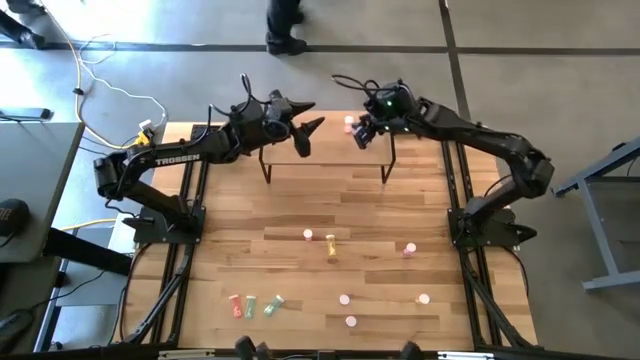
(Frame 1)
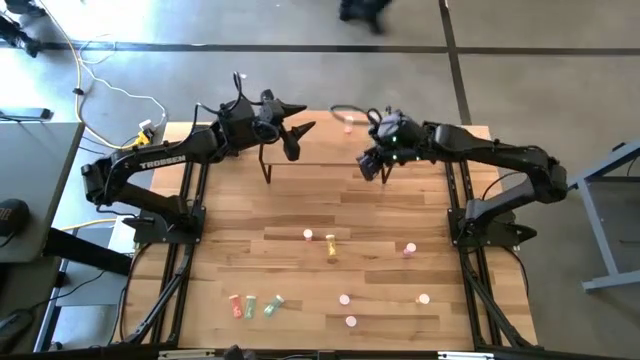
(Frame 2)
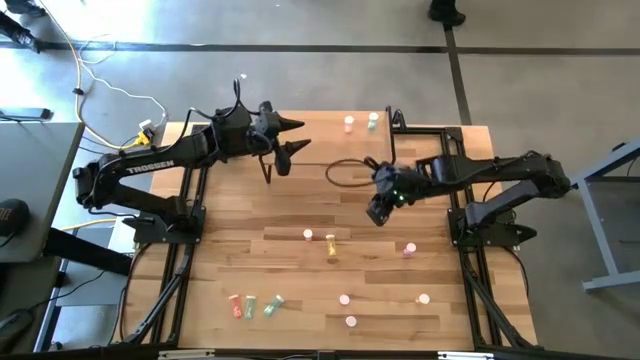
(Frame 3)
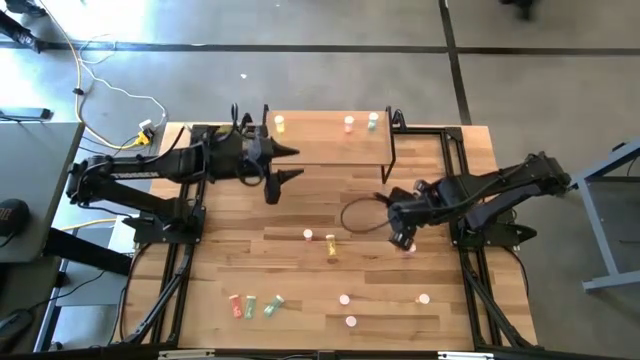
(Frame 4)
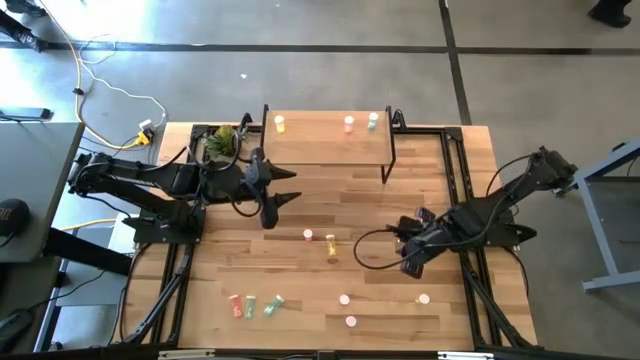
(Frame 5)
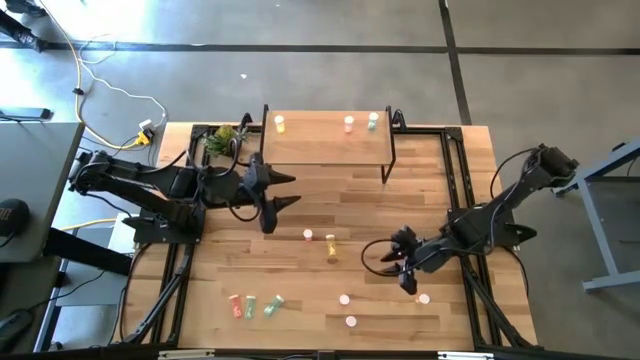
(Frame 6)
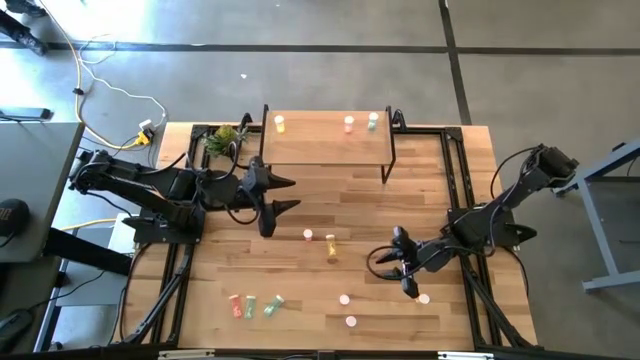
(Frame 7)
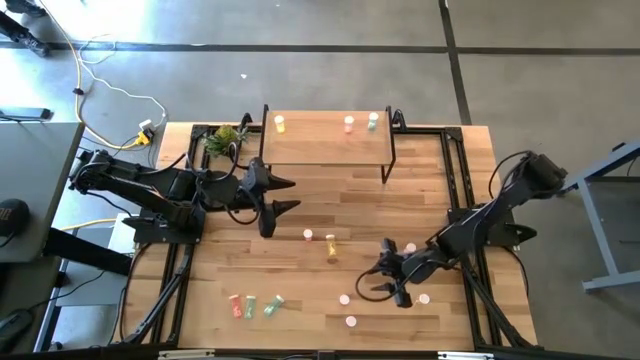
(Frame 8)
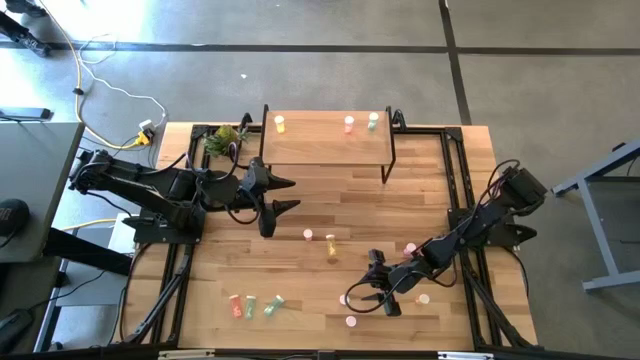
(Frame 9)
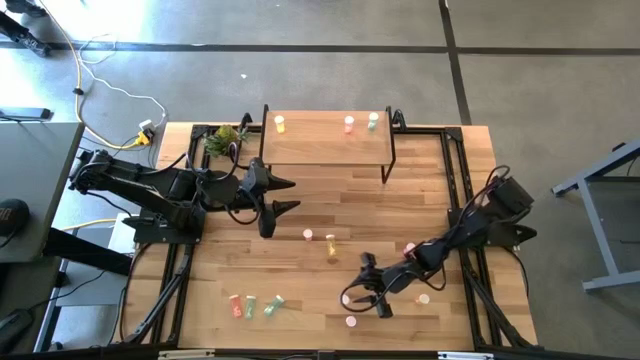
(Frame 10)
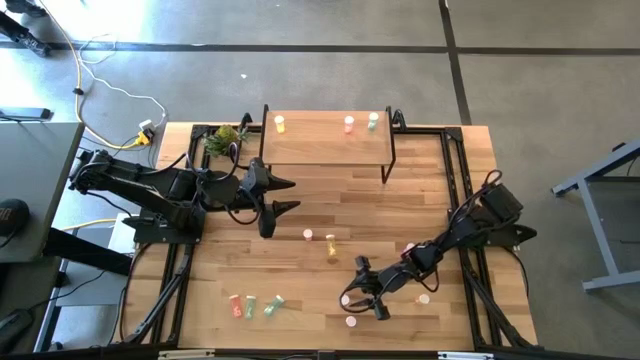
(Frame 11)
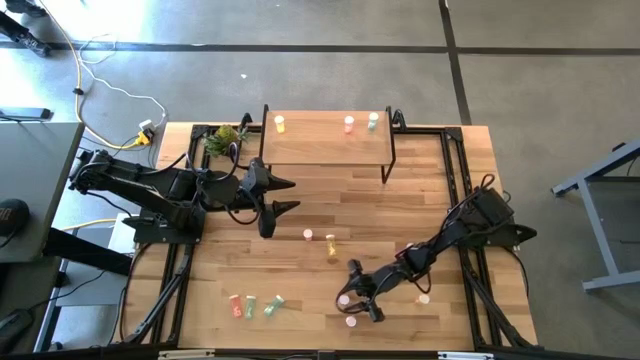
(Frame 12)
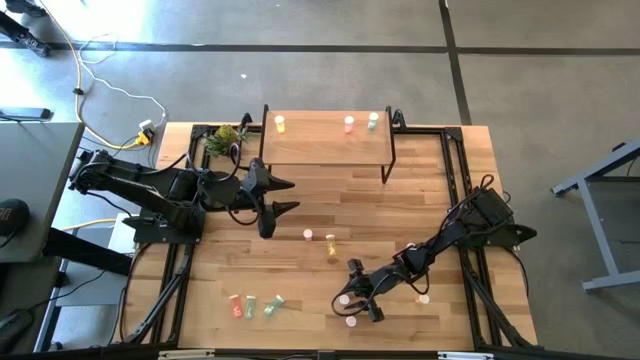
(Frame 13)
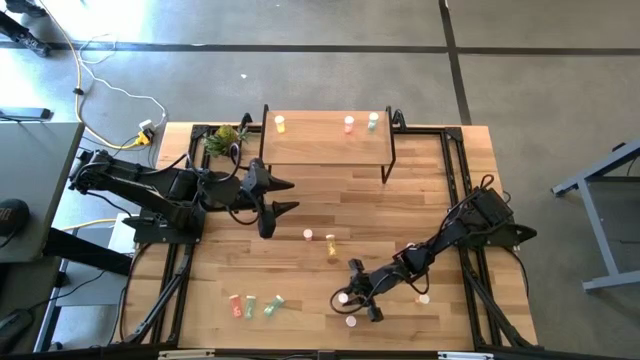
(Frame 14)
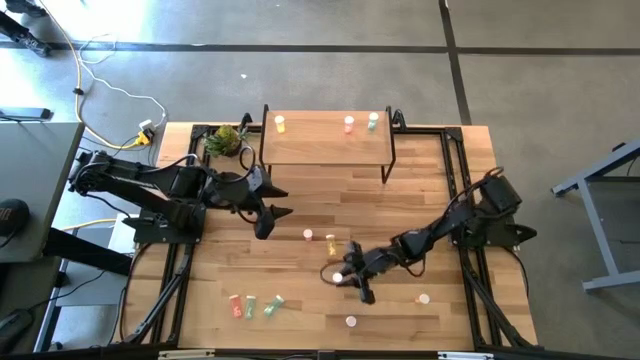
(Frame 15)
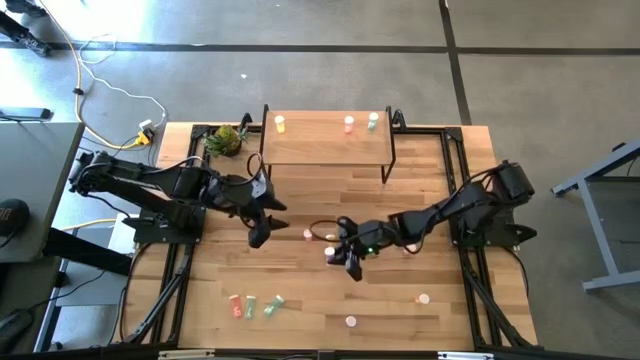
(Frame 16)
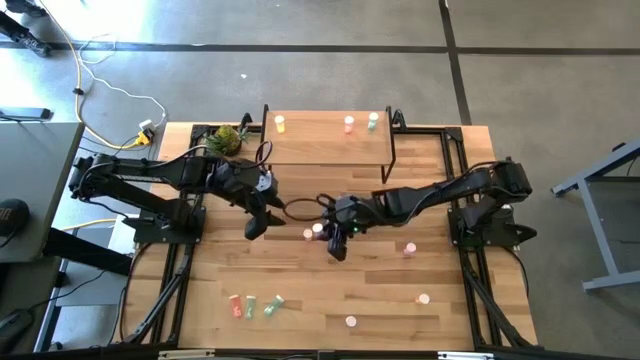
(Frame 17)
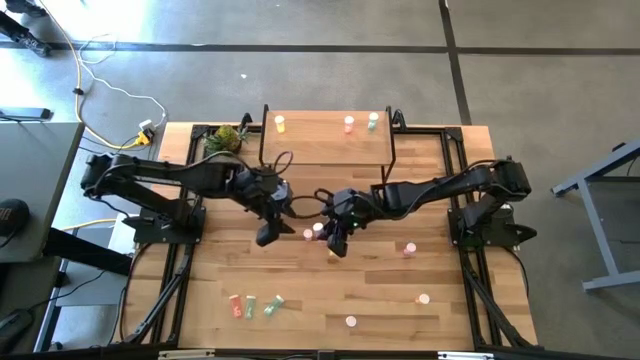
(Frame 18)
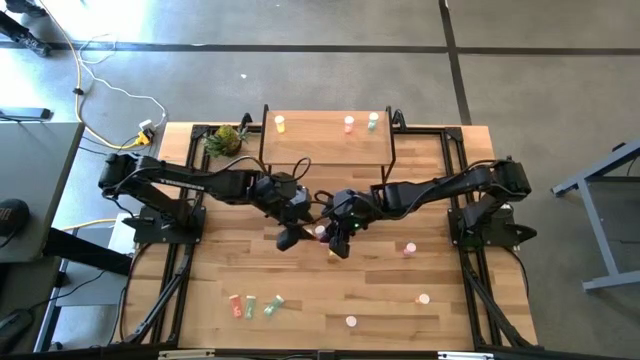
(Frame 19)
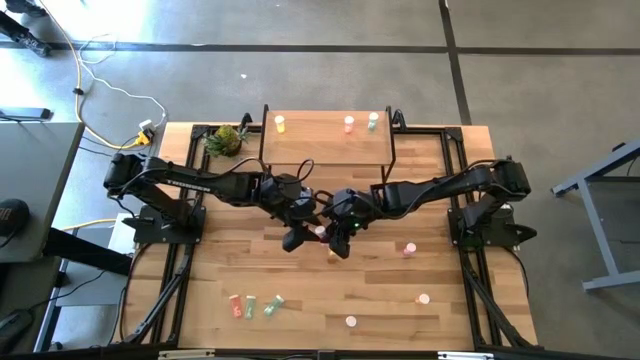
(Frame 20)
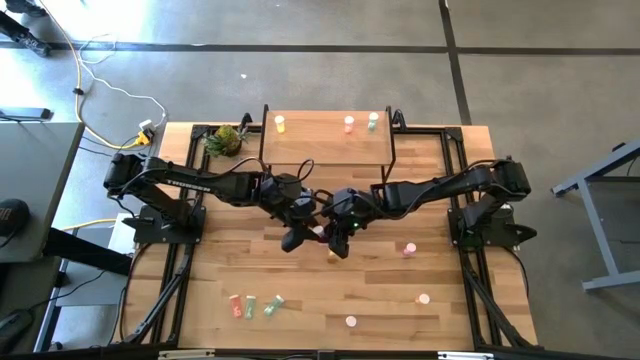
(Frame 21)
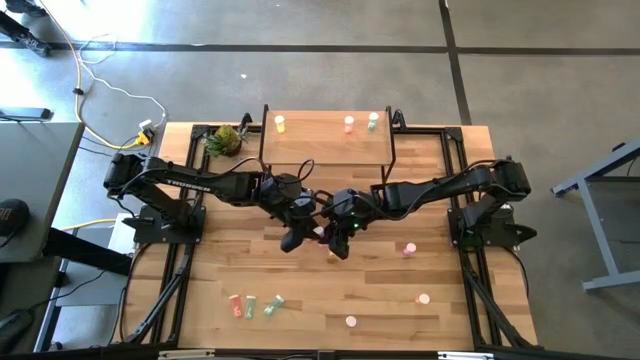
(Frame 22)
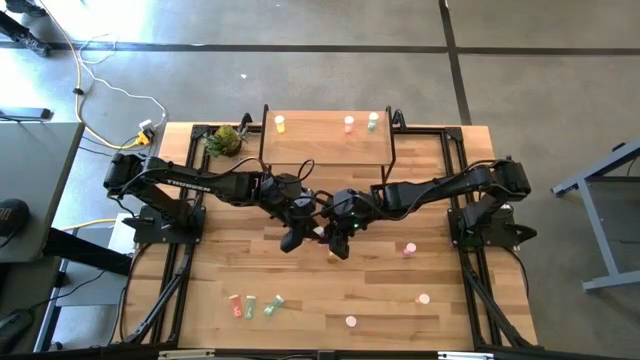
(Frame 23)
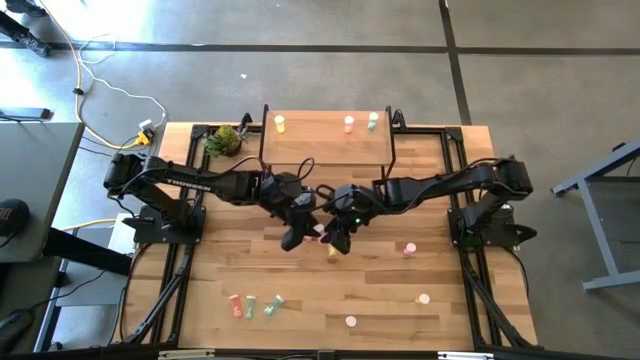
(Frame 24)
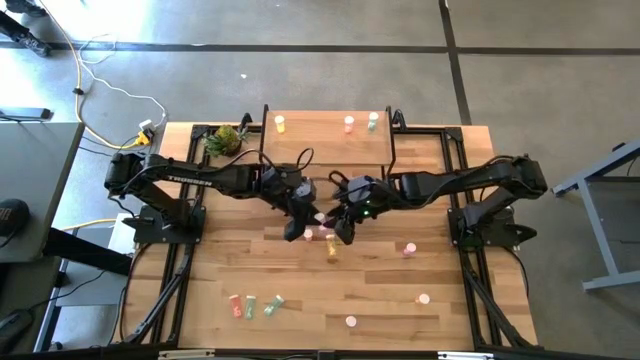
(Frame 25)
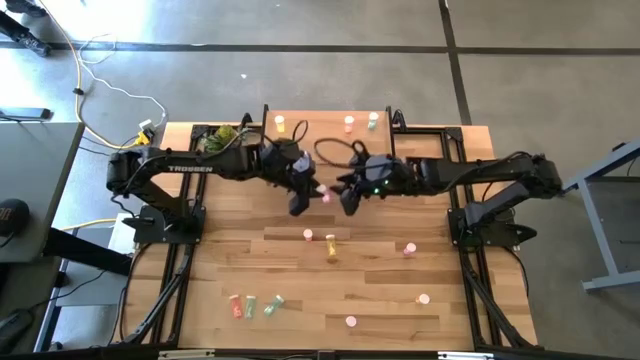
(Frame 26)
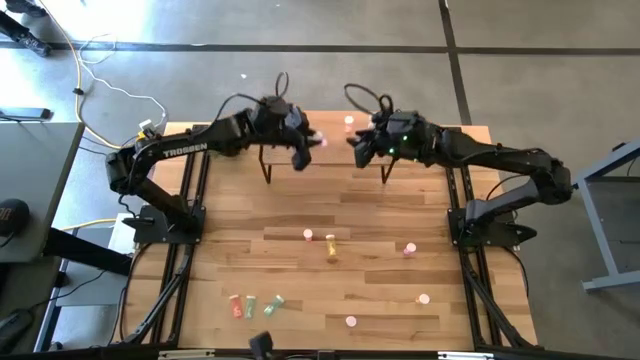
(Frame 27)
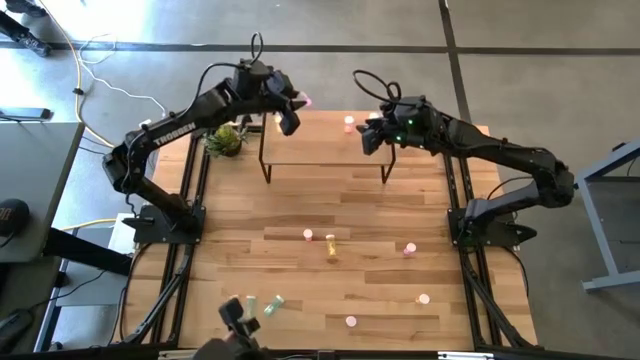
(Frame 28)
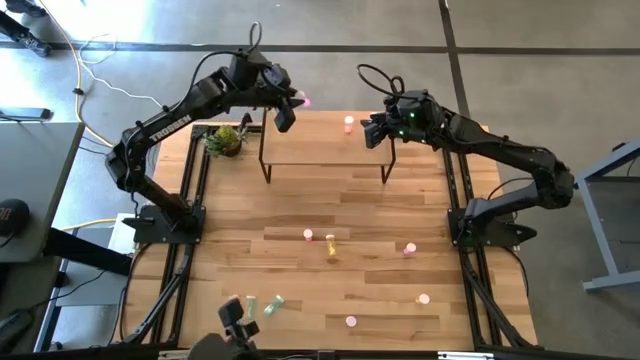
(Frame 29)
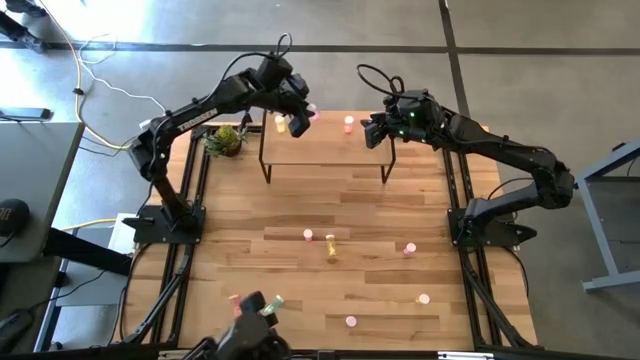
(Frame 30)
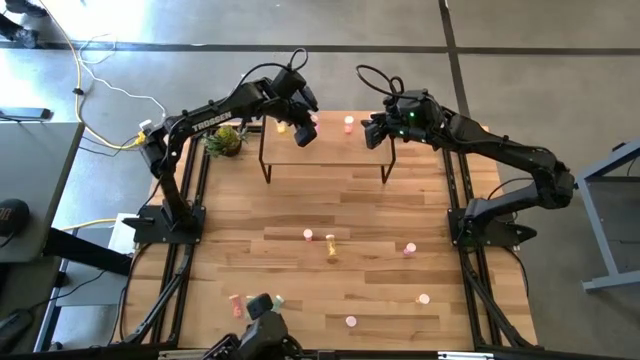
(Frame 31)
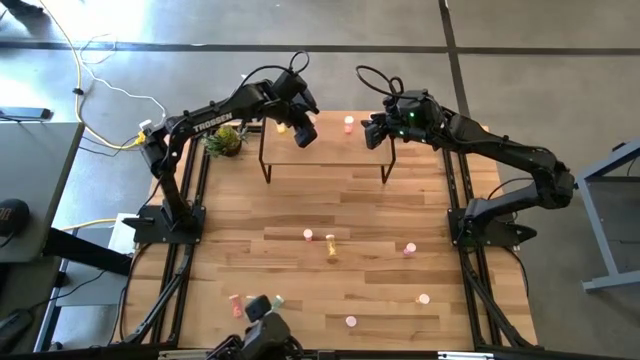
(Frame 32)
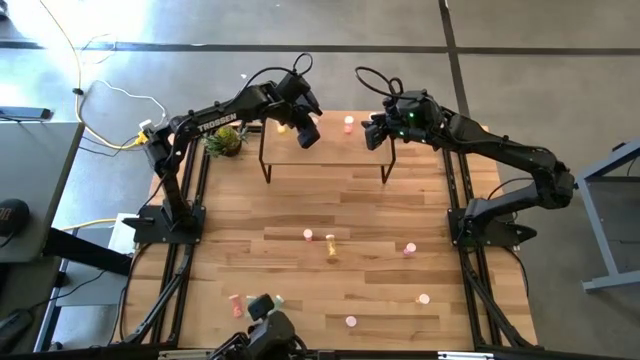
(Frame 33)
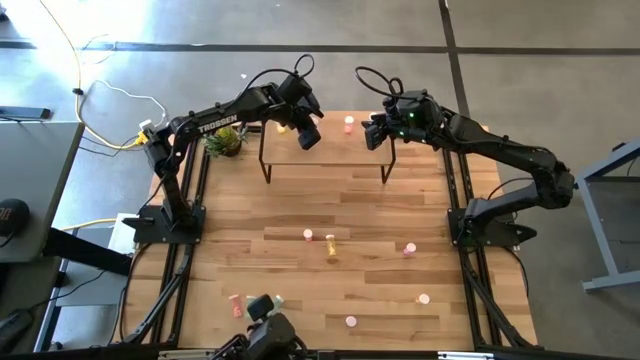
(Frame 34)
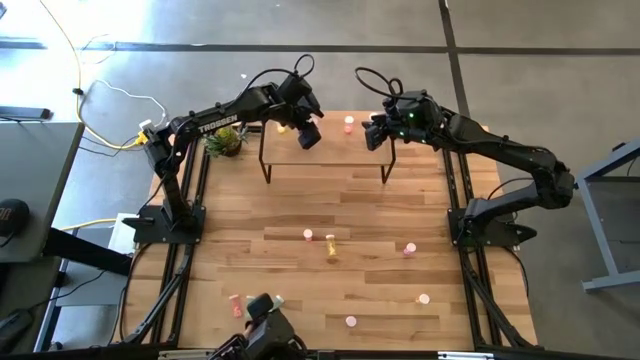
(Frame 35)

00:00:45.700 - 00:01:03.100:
Task: Pick and place medicine bottles onto shelf by color
Put the center pink pill bottle on the shelf

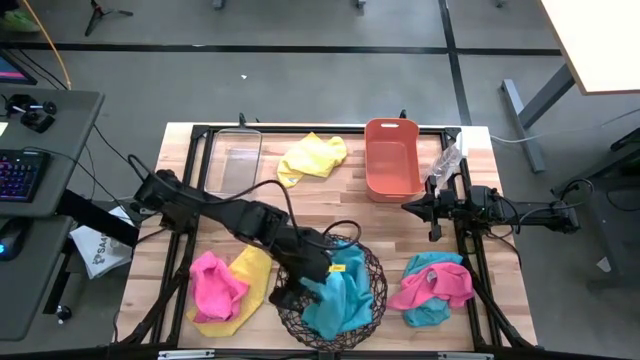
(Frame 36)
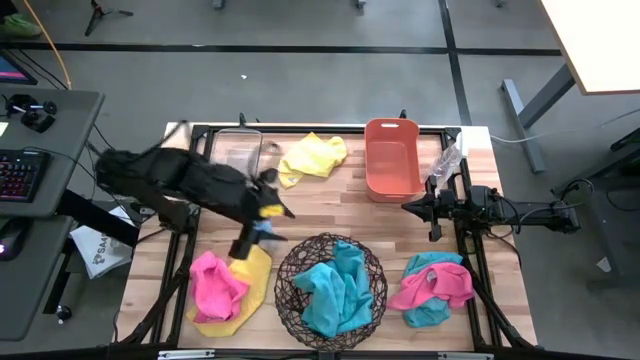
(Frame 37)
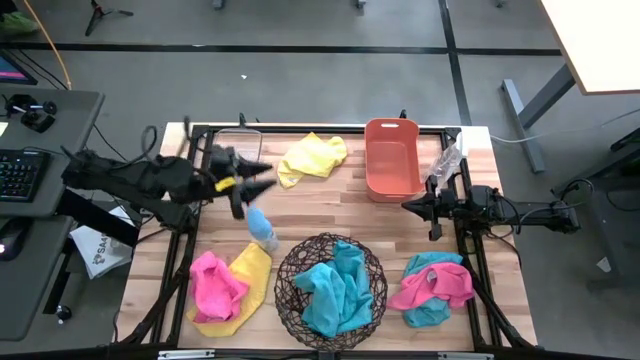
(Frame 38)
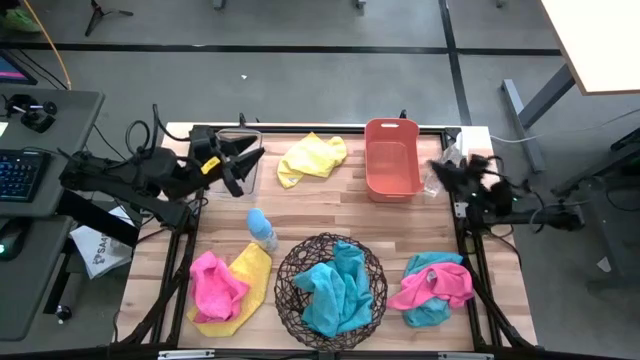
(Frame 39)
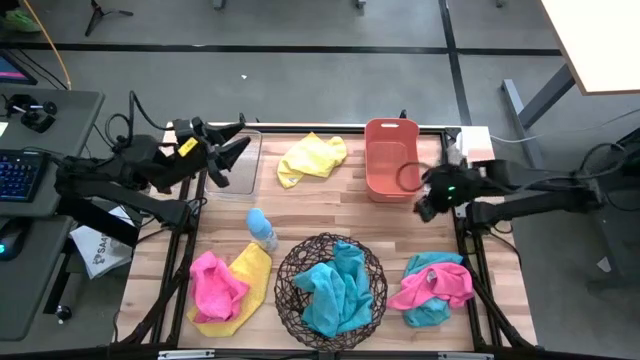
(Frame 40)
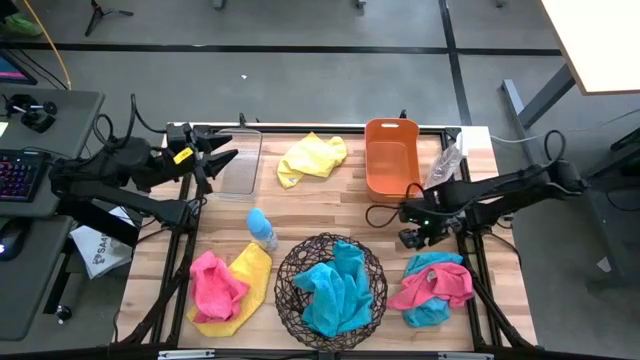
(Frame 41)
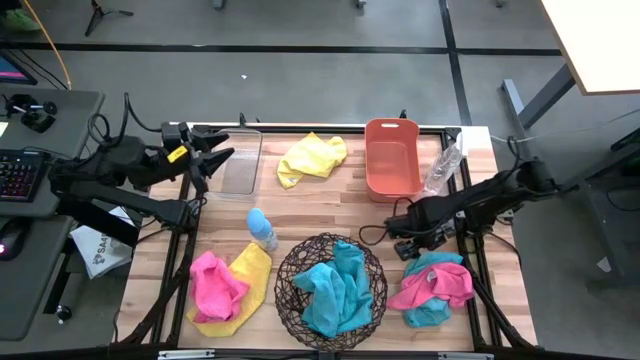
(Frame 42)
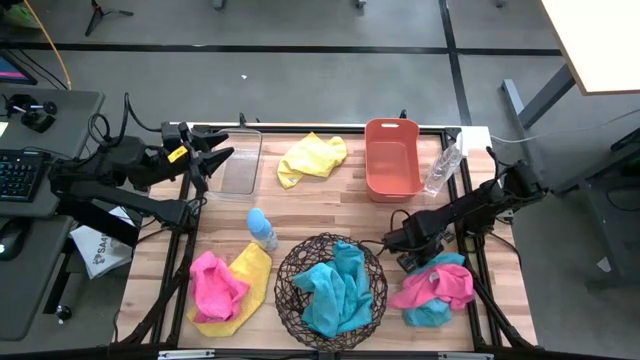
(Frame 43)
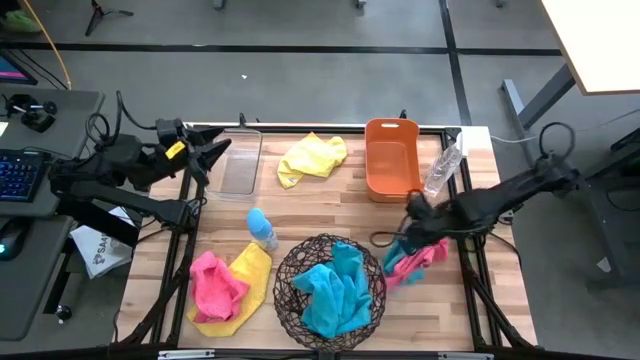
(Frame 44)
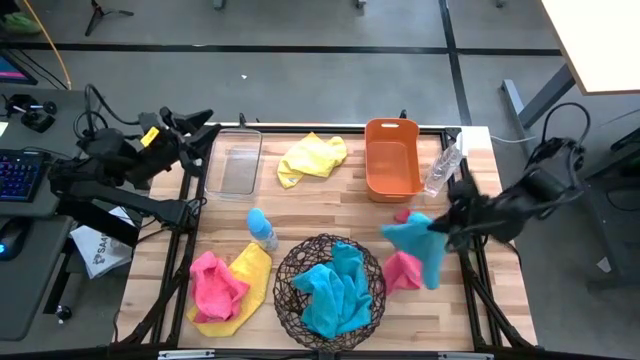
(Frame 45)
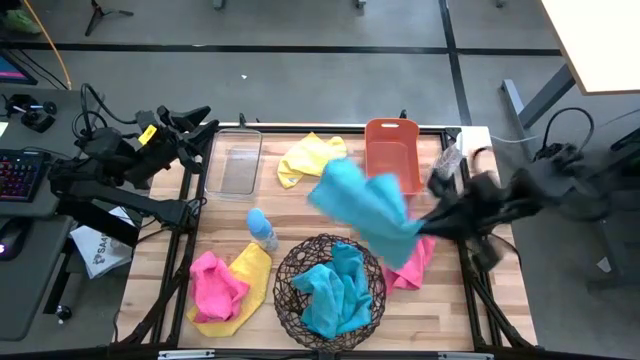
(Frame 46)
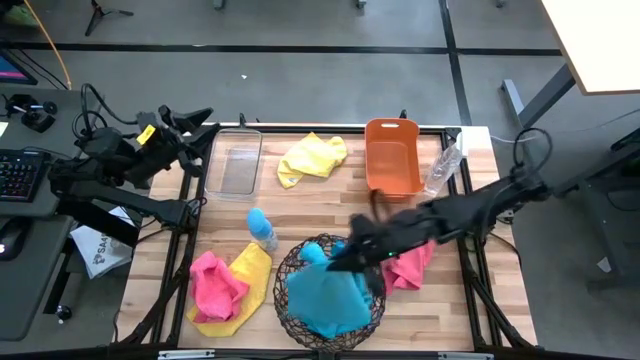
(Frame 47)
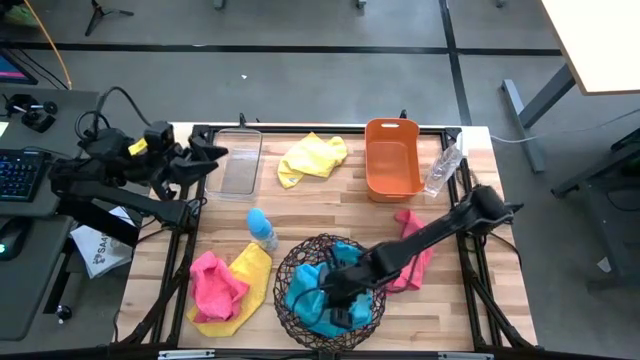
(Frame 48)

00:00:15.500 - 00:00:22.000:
Task: Sort microfiber towel by color & place in baskets
Put the blue towel into the wooden basket
